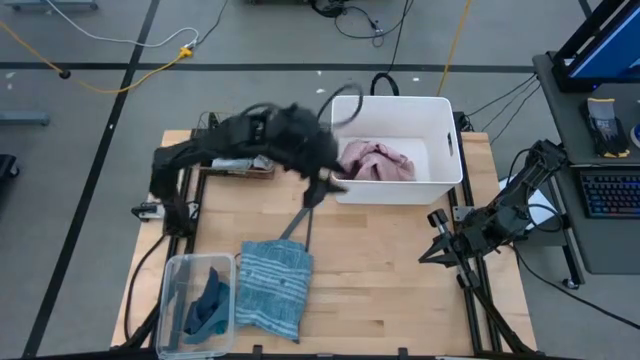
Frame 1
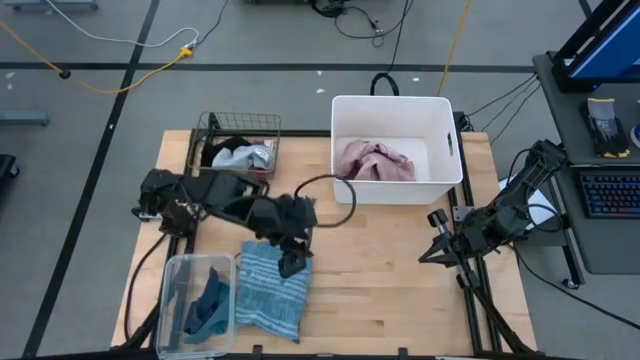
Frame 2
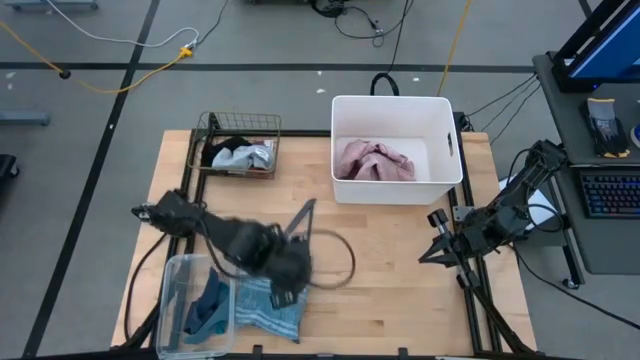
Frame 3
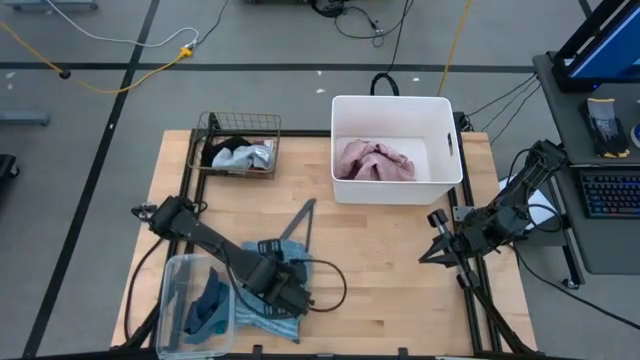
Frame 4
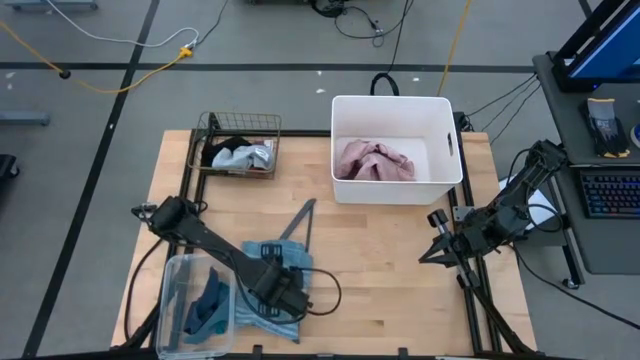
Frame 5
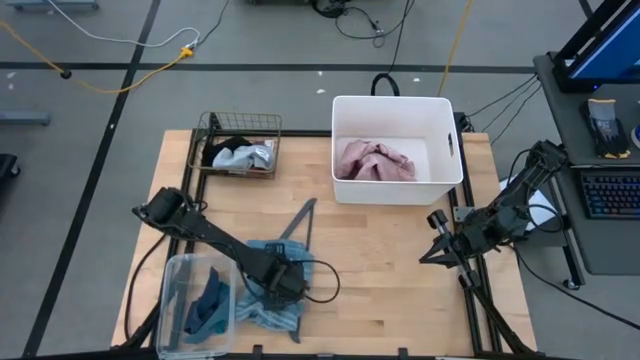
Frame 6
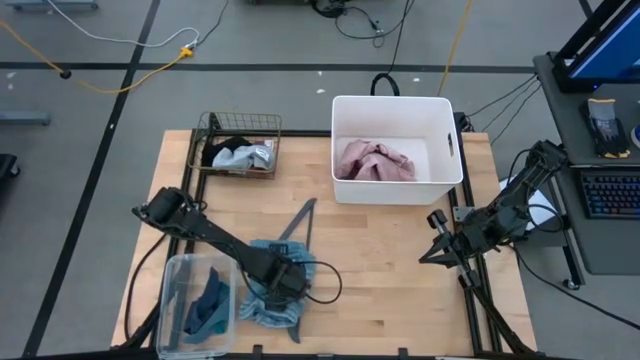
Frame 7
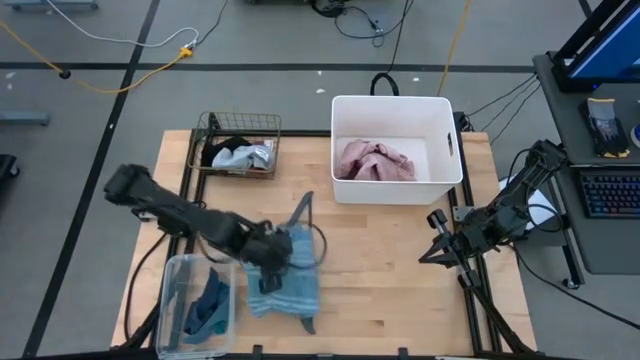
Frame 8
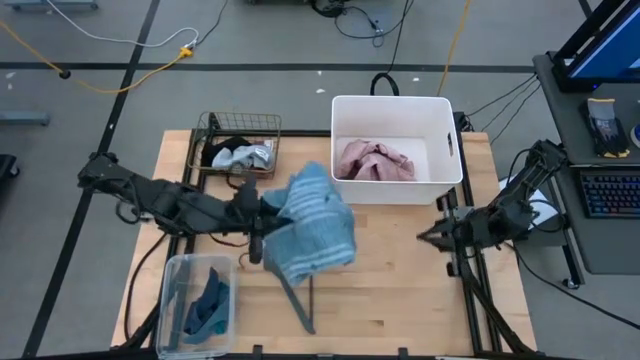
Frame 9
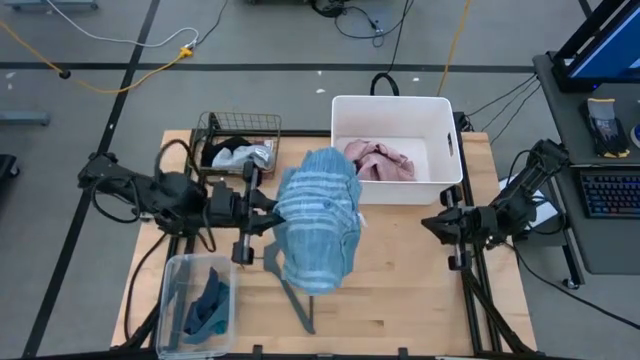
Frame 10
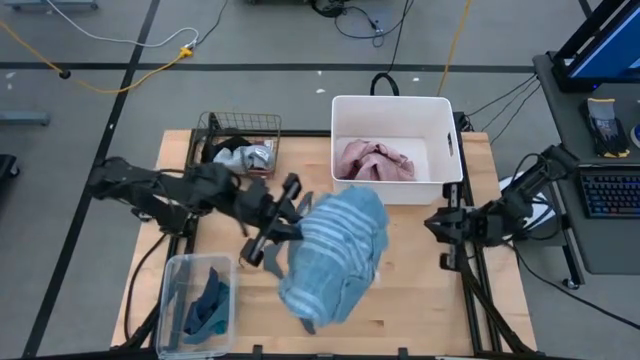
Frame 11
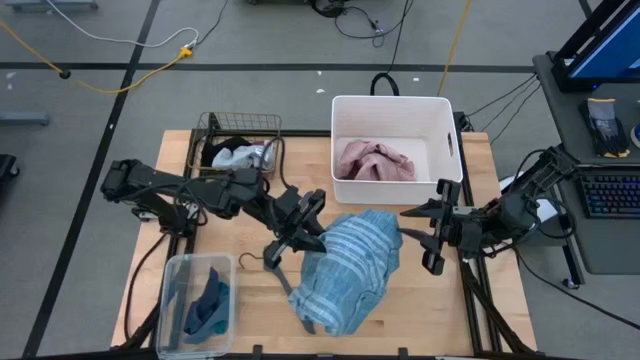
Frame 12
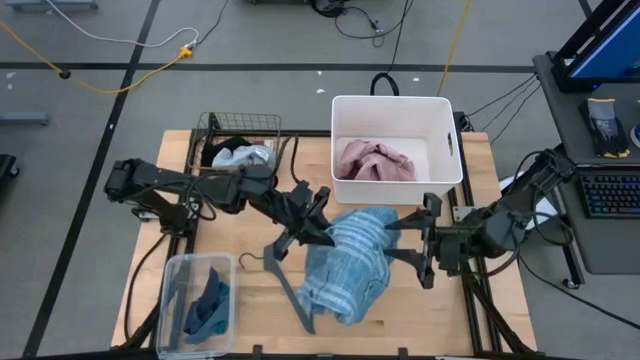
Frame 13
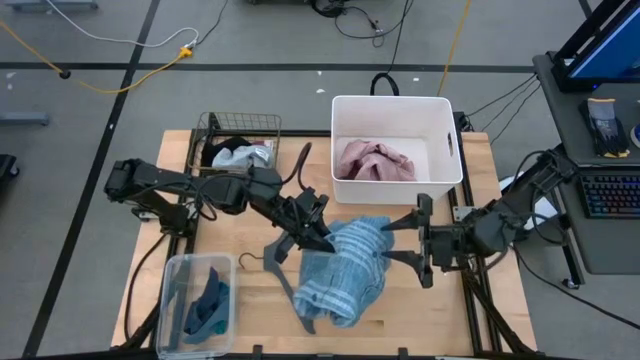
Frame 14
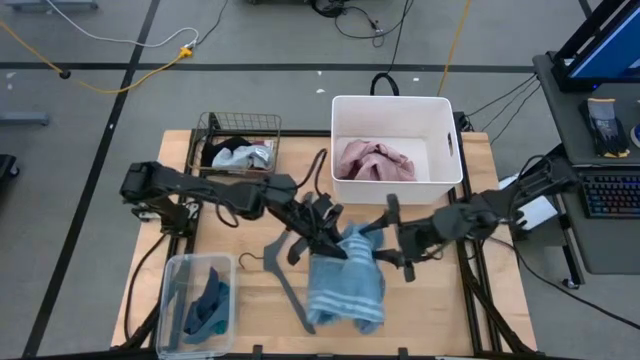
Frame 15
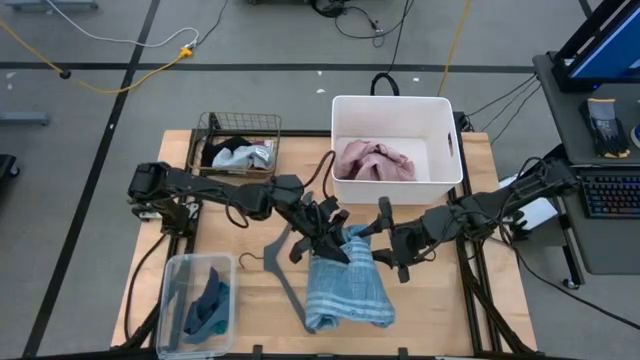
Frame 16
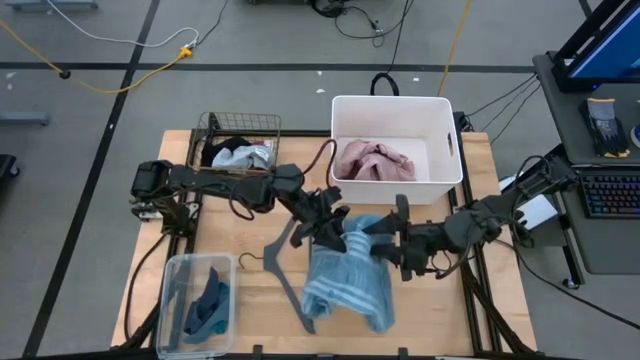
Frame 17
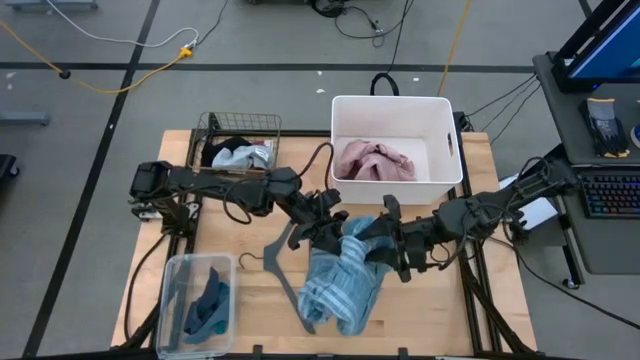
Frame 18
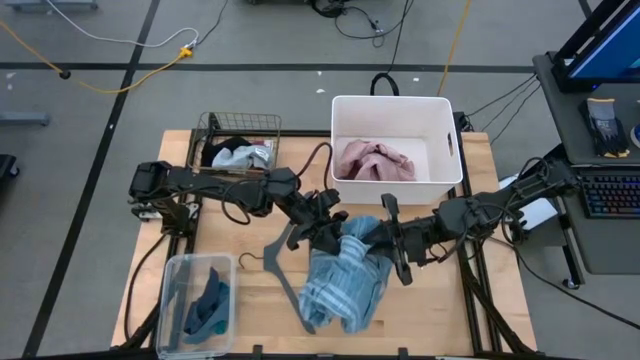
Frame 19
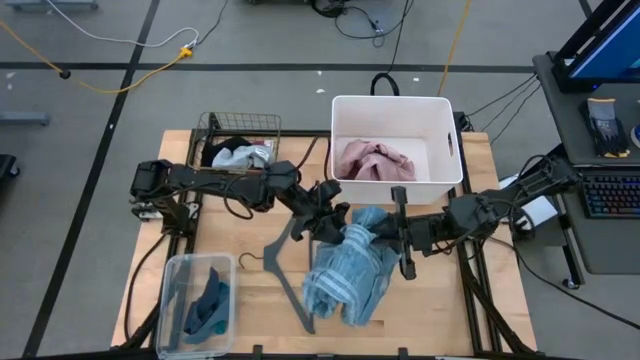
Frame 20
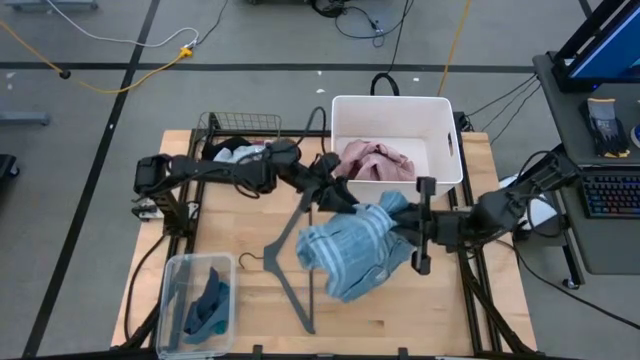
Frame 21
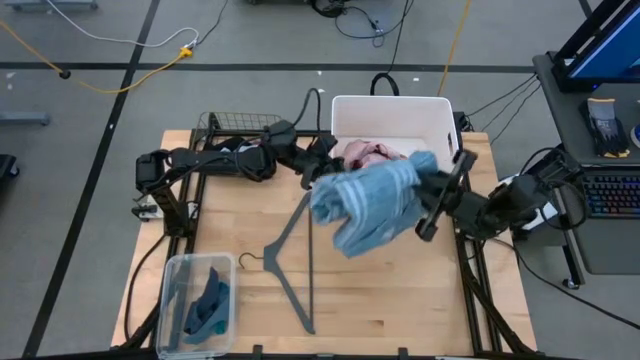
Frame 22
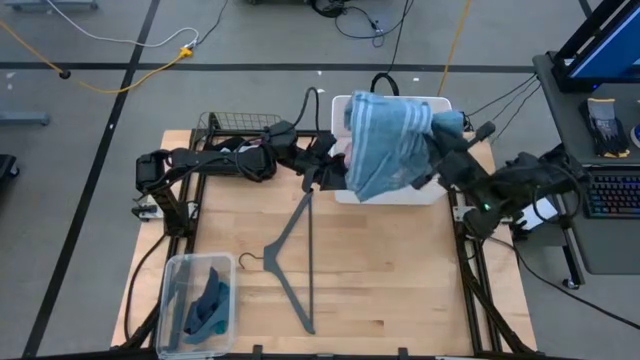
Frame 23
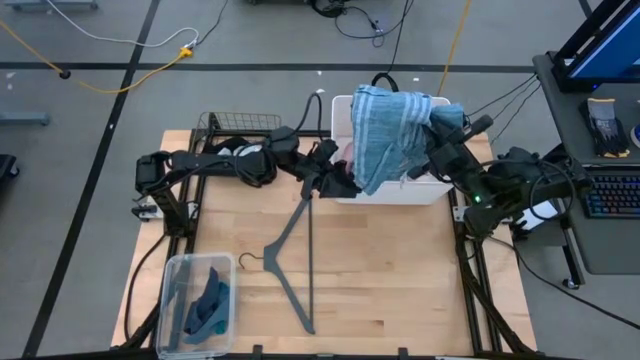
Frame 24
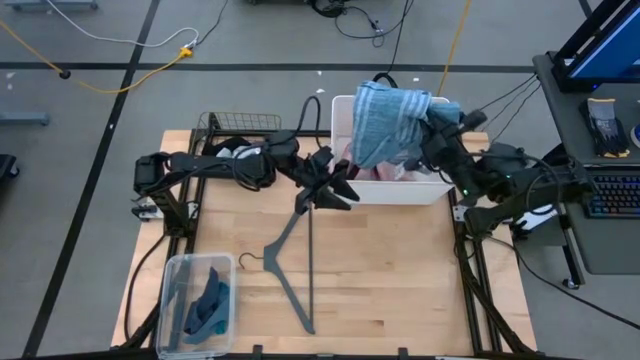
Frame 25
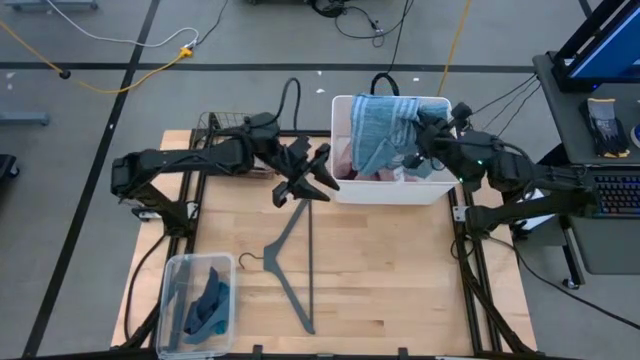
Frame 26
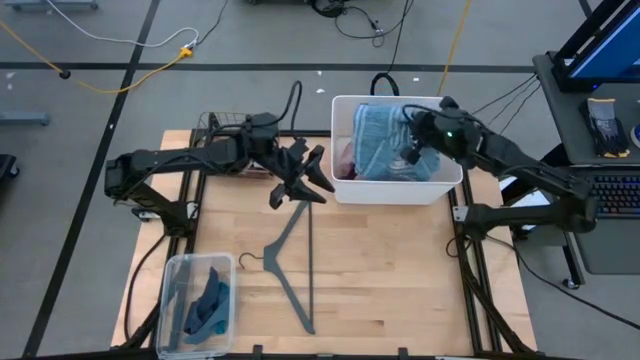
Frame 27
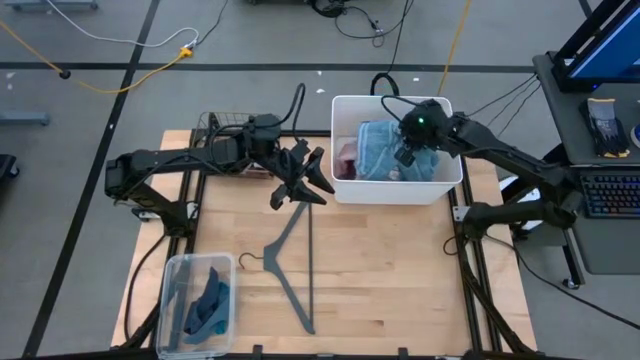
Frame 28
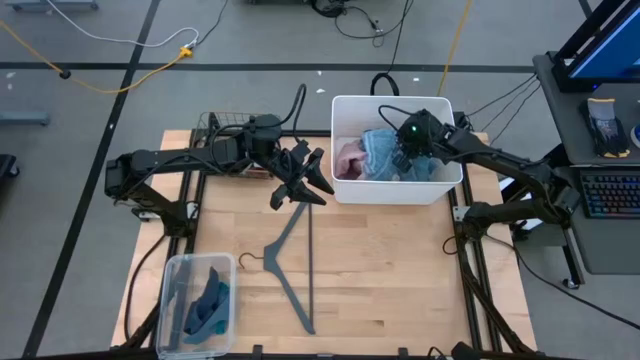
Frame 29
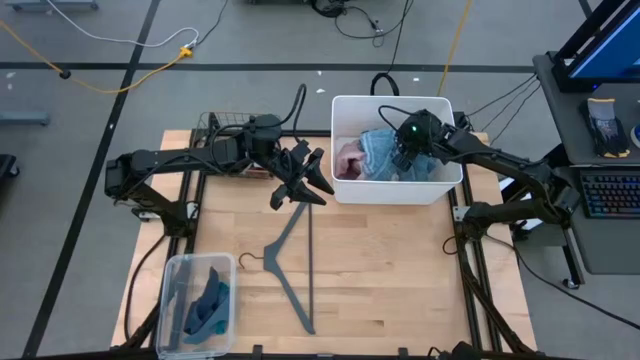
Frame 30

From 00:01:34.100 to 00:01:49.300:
Task: Pick & Place Cloths
Put the blue polo shirt into the white bin
